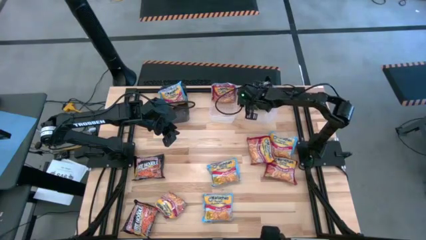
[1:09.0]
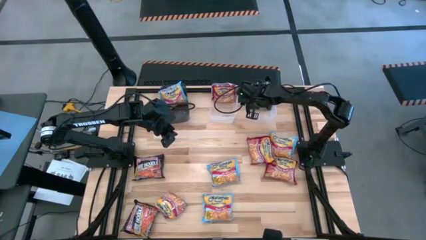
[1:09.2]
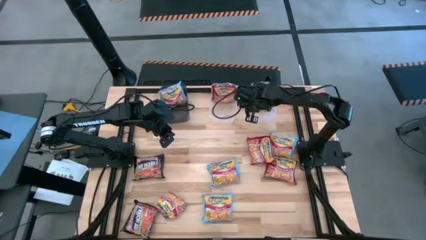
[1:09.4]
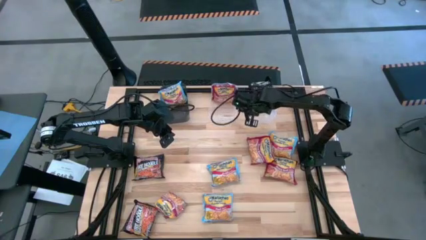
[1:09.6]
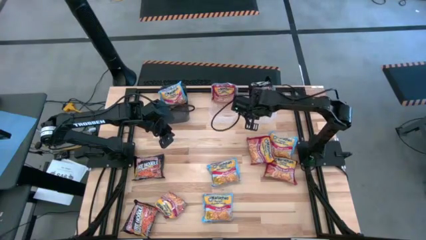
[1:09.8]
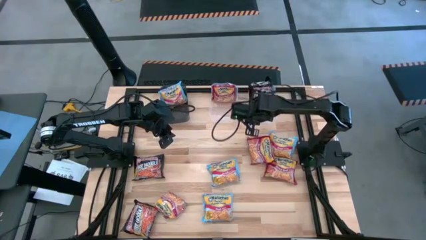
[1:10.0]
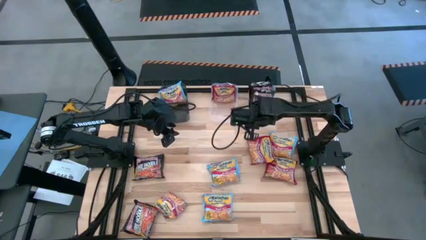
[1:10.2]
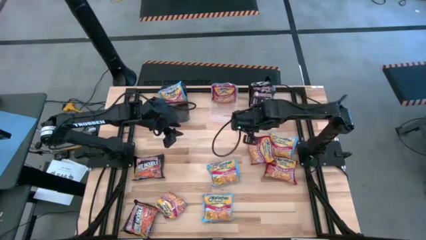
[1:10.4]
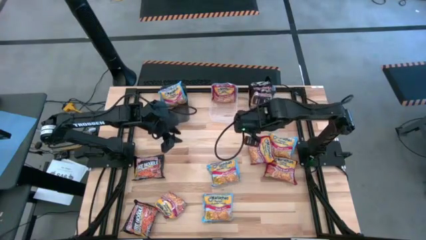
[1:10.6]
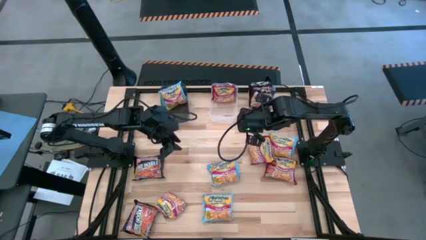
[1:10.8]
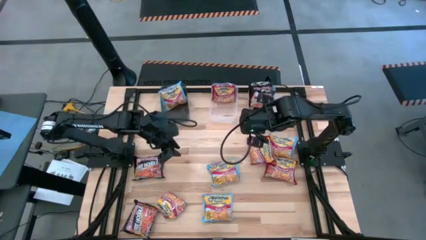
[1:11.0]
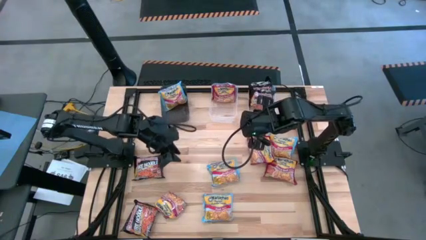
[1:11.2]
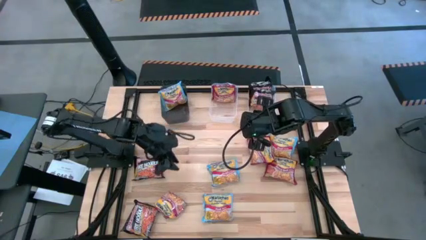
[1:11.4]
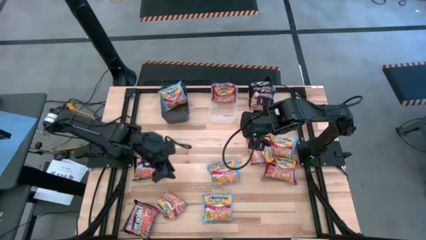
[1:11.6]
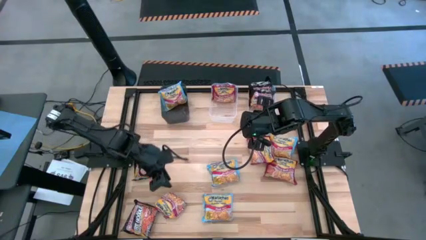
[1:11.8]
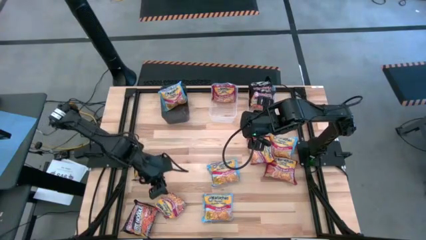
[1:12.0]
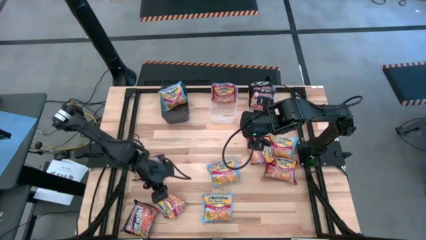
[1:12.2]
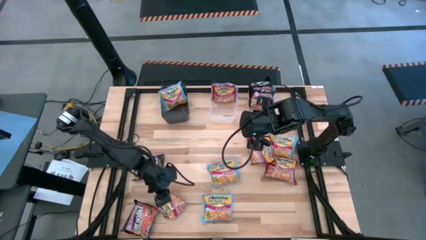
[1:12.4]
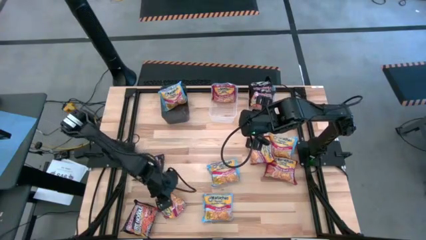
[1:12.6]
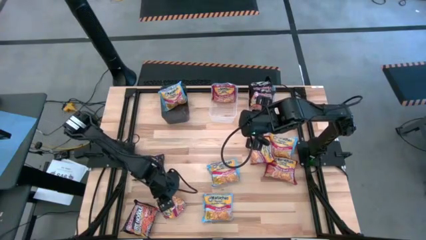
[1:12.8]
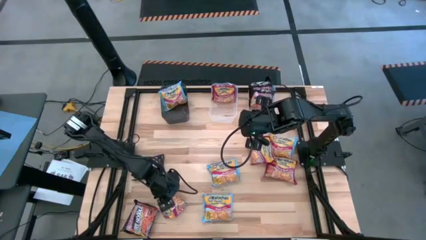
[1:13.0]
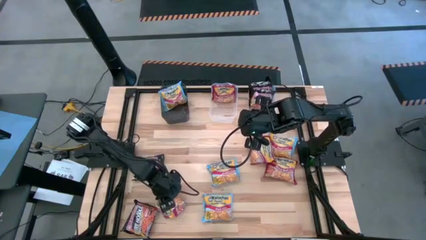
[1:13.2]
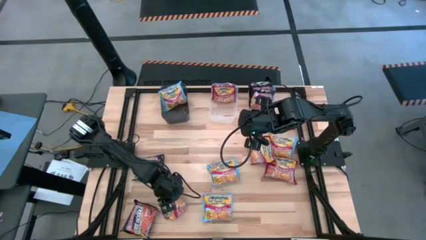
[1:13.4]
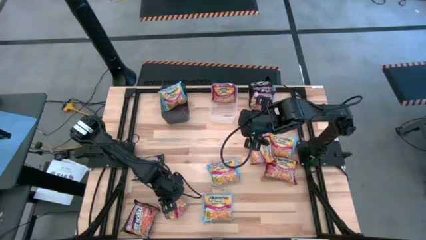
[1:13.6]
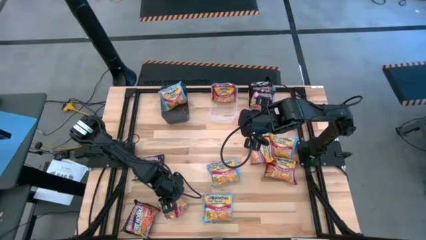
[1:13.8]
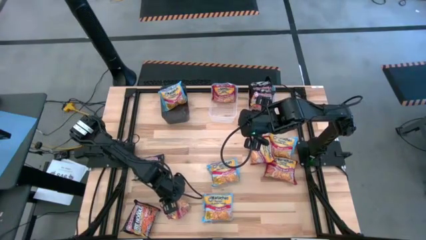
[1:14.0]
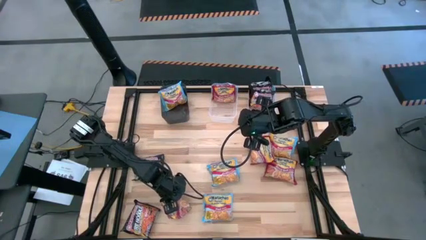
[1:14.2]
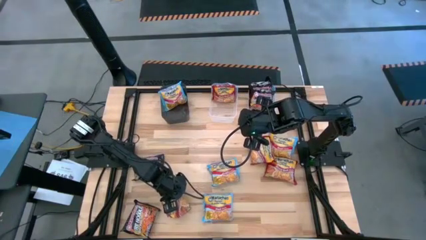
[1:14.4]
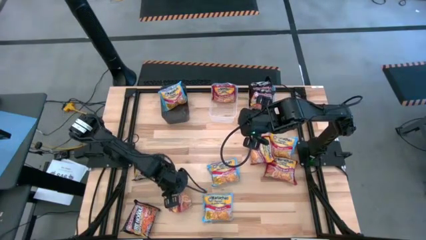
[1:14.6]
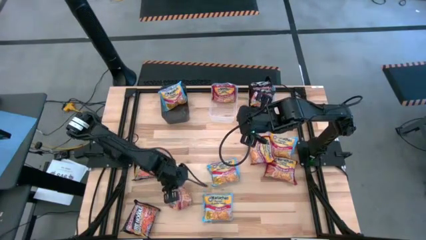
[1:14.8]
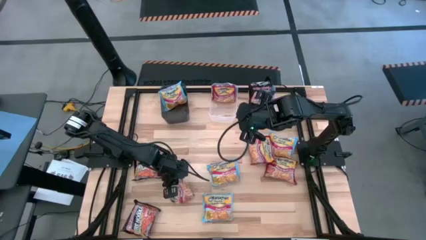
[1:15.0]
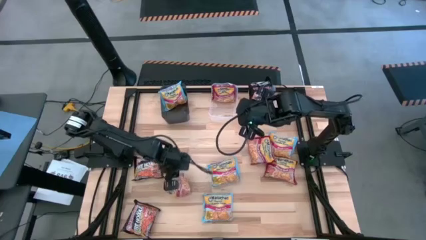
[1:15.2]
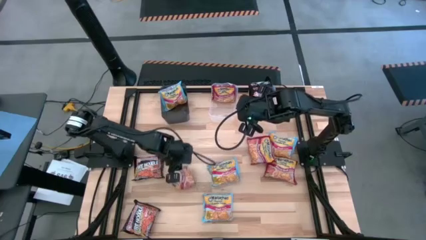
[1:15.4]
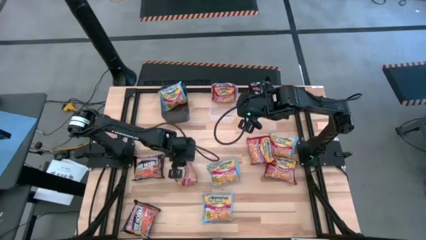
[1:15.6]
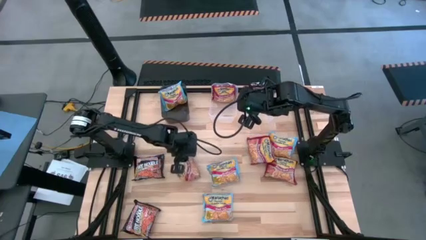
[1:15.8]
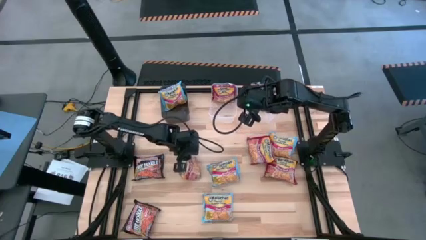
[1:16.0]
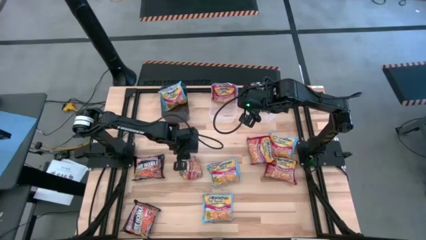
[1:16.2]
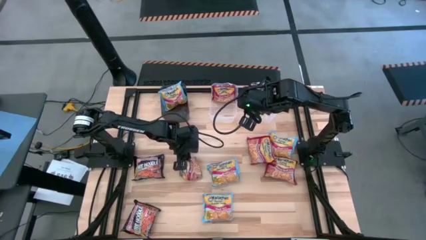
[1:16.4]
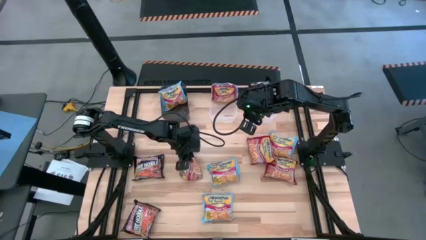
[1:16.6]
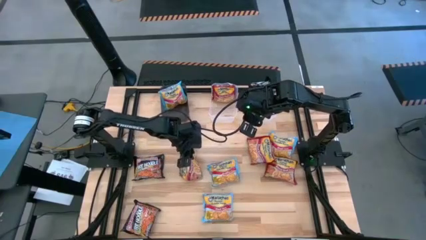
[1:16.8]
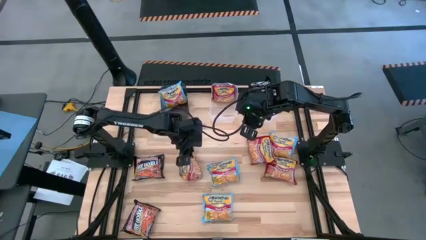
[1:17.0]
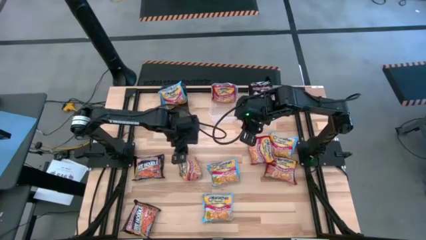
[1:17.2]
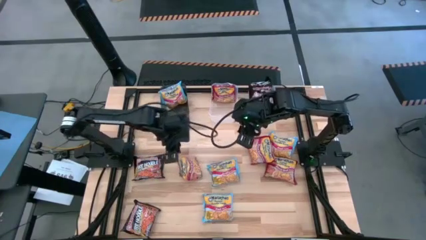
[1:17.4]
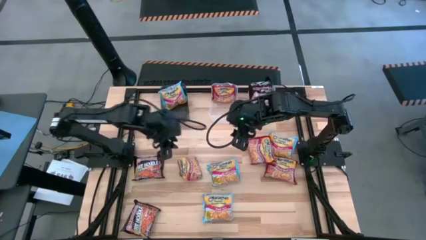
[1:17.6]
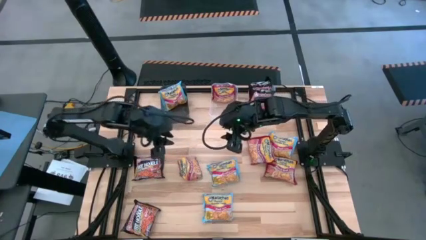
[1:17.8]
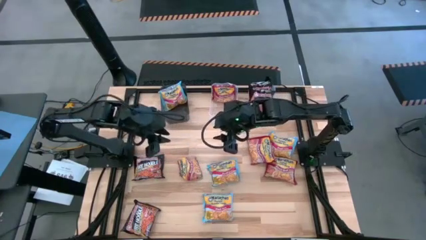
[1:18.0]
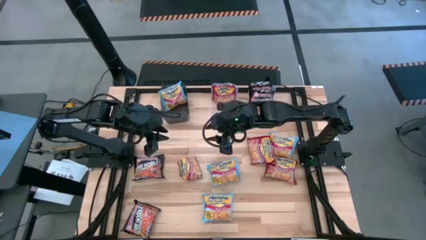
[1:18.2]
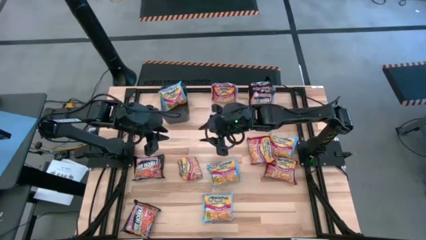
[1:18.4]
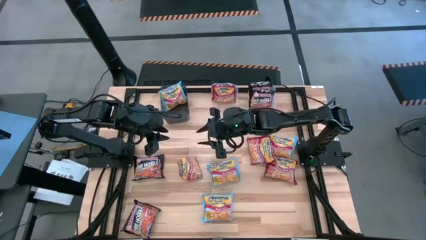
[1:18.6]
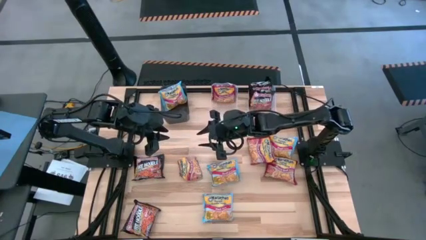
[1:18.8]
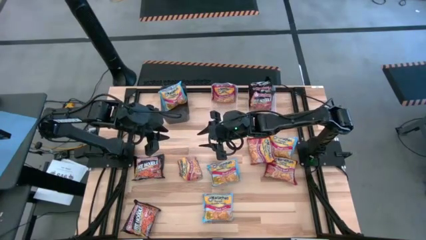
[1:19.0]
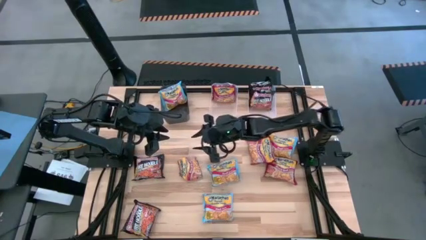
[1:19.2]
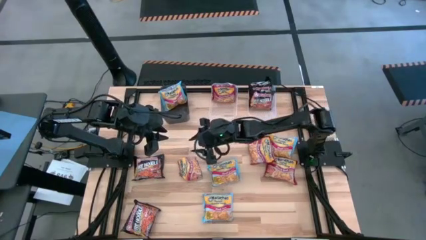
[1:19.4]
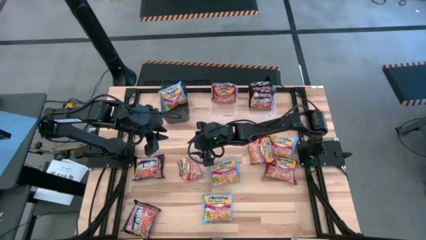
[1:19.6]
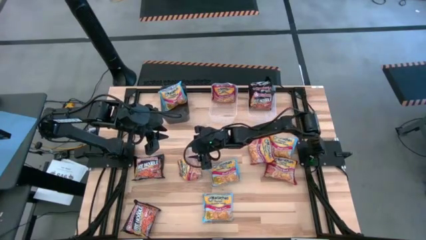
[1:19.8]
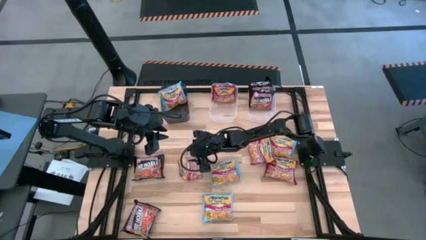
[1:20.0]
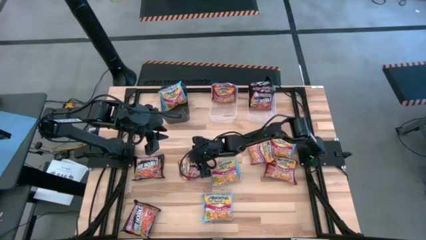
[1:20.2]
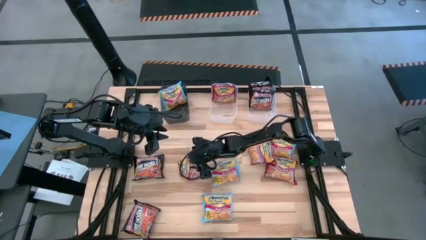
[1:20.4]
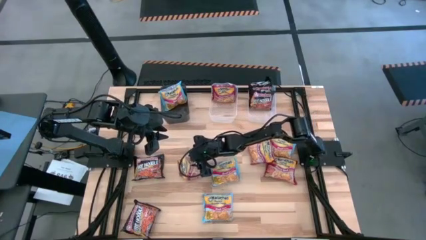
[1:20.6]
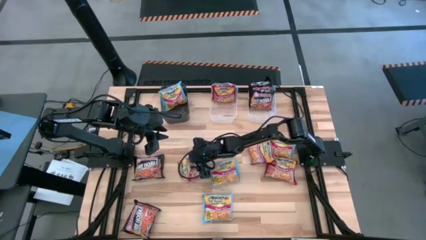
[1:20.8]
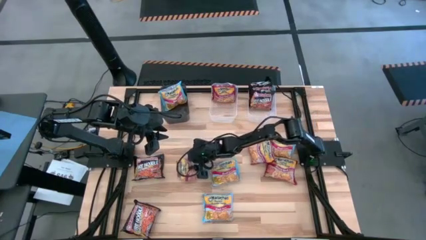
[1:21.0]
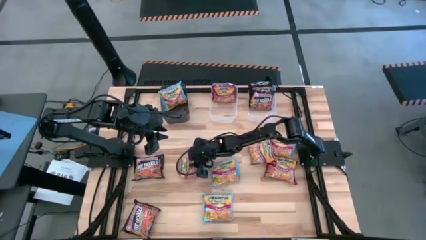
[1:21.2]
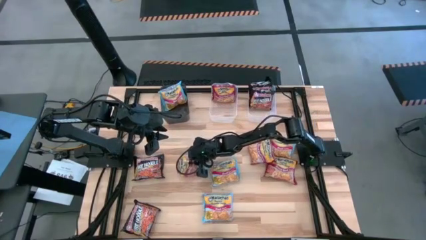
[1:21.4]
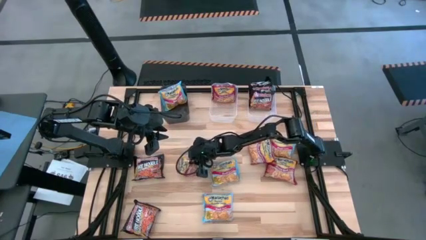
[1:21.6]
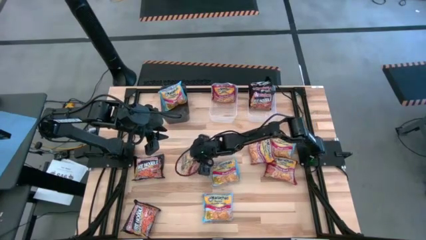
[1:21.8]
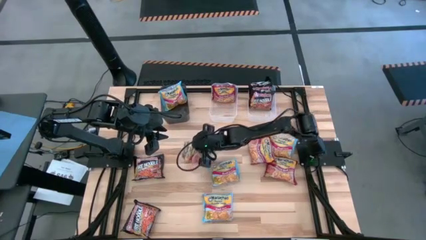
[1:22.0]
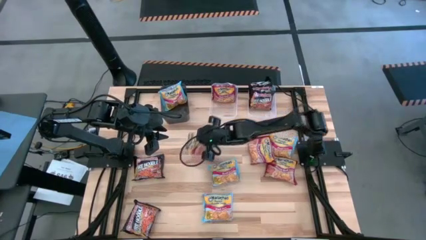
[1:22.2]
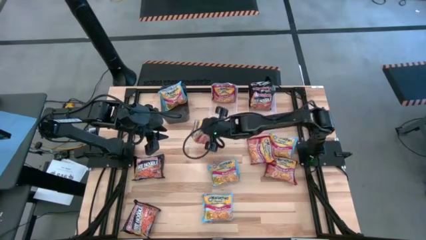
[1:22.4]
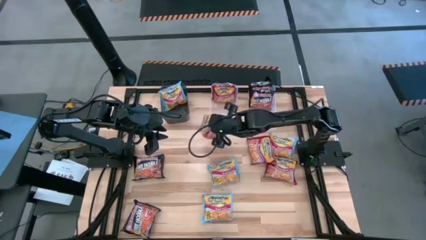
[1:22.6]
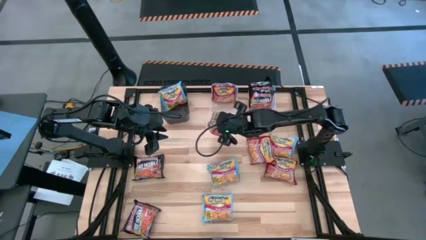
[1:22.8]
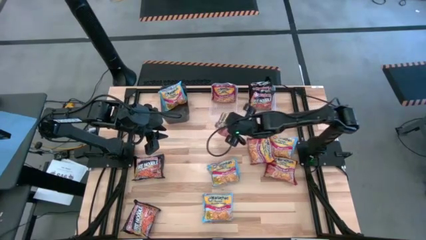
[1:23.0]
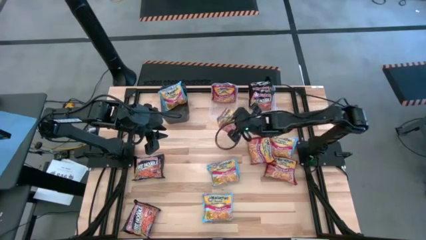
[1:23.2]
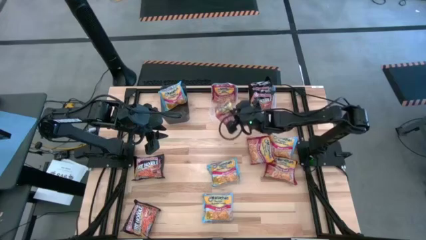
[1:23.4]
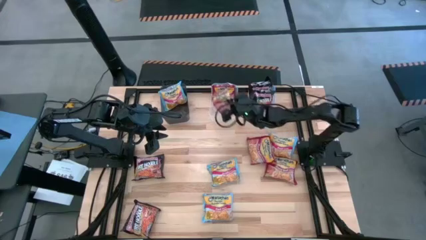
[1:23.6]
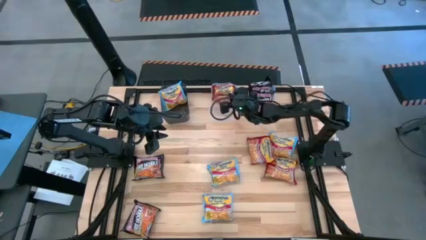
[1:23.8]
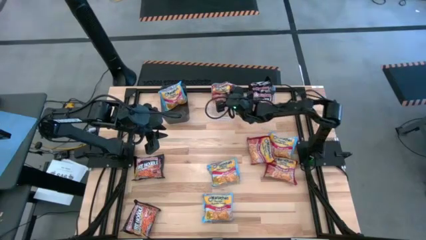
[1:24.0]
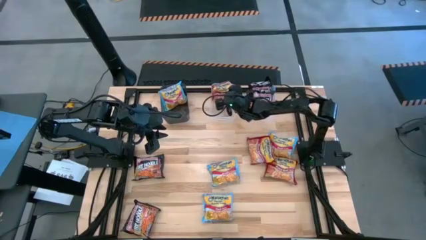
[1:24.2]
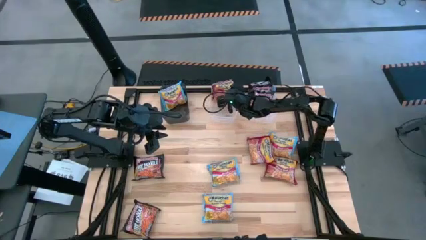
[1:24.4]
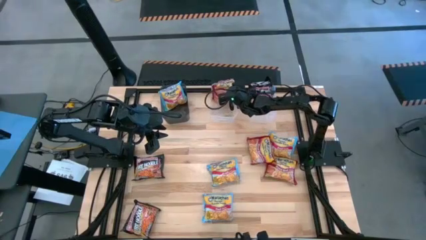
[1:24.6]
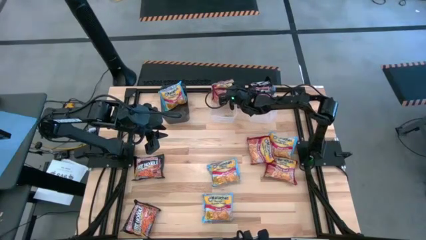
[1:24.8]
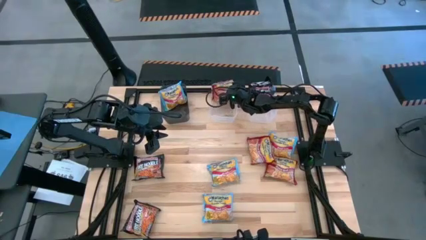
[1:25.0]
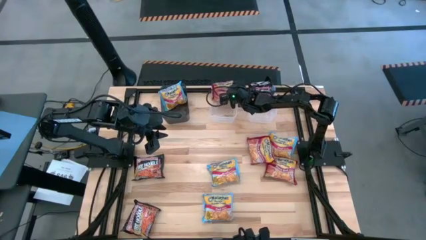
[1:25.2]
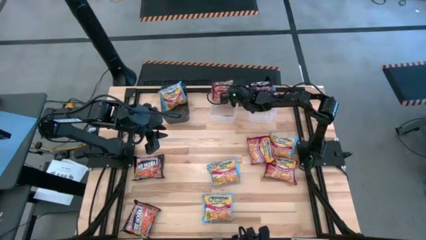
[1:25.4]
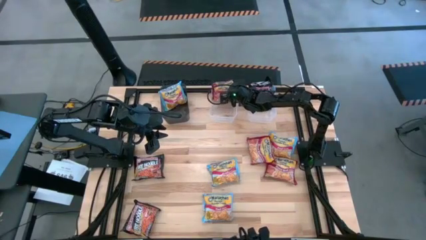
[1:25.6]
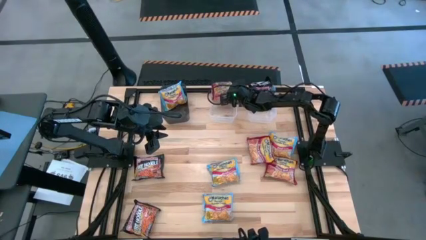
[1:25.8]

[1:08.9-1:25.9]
Task: Sort Maruchan noodles
Put the red noodle pack into the left transparent bin
